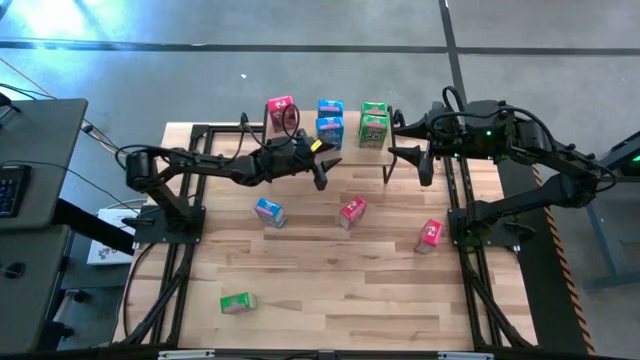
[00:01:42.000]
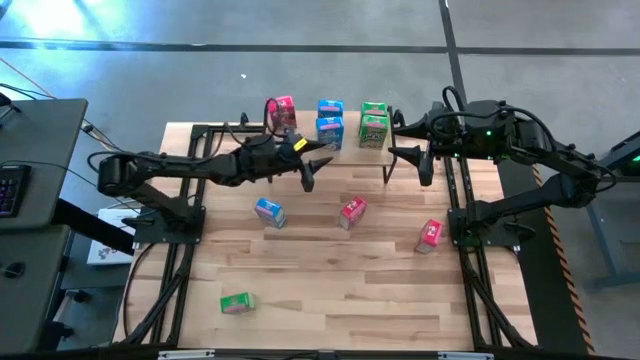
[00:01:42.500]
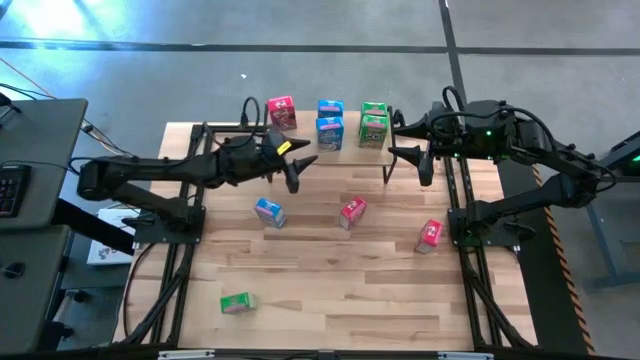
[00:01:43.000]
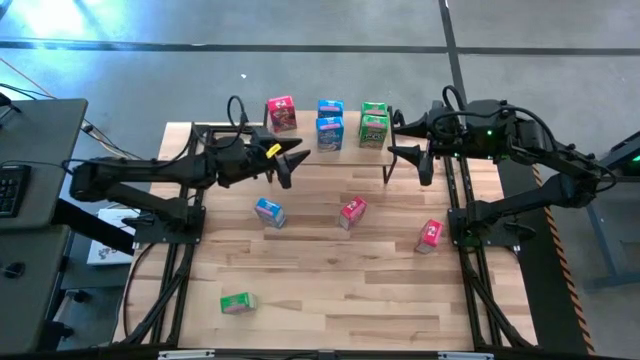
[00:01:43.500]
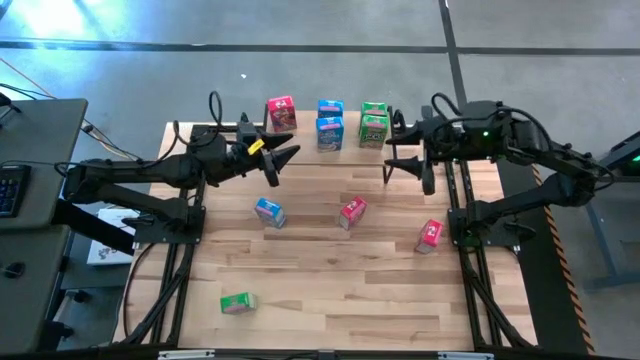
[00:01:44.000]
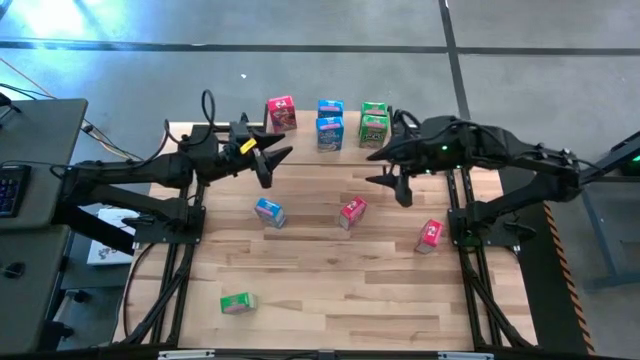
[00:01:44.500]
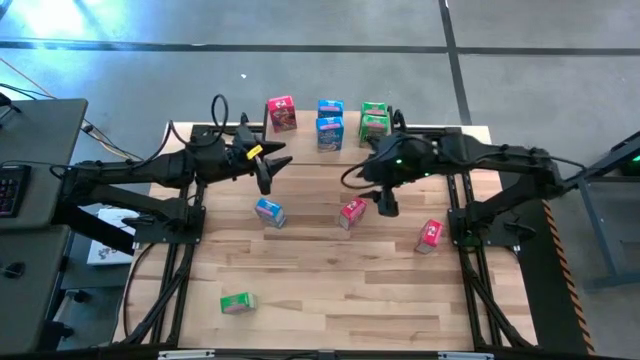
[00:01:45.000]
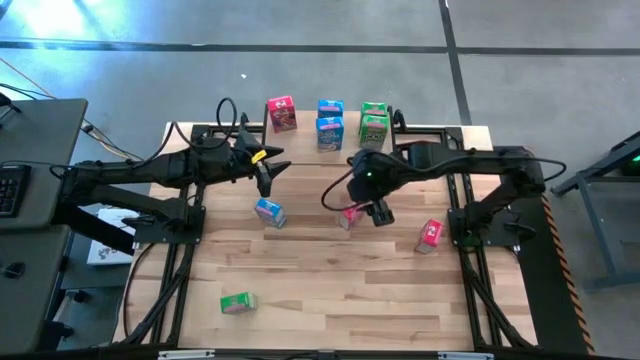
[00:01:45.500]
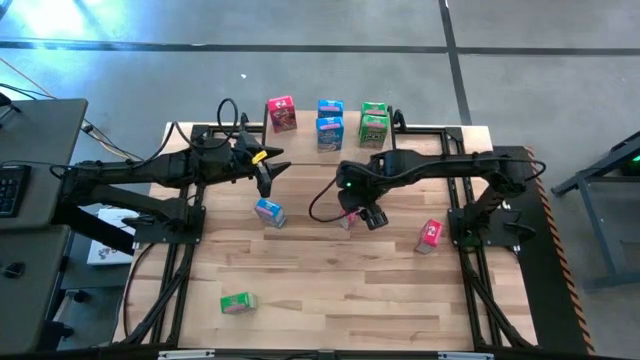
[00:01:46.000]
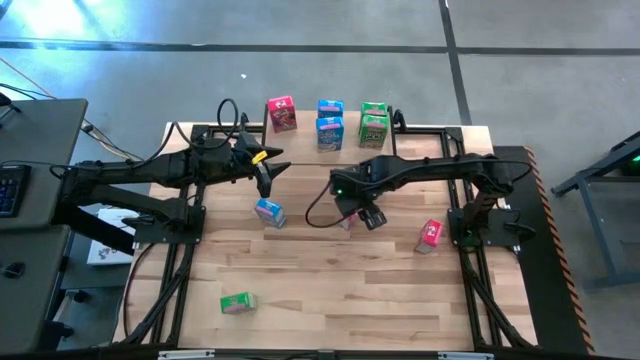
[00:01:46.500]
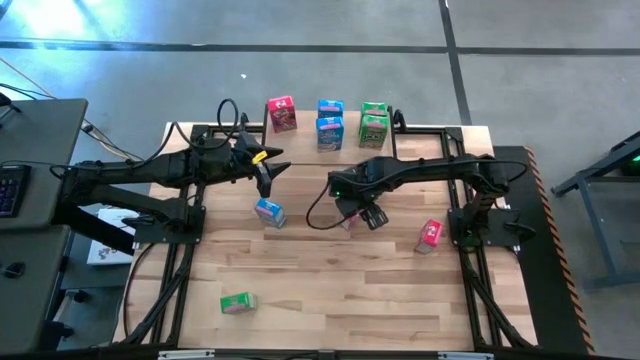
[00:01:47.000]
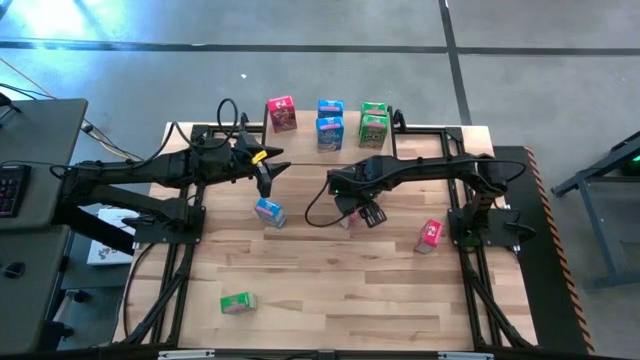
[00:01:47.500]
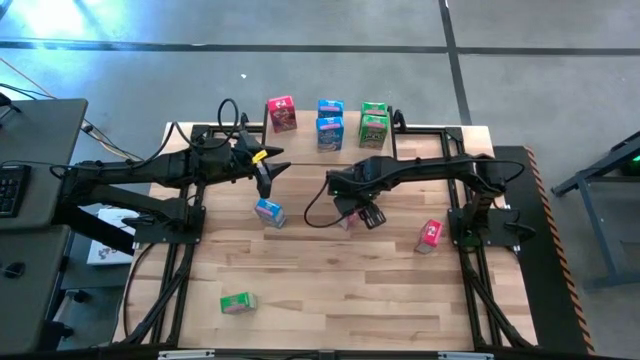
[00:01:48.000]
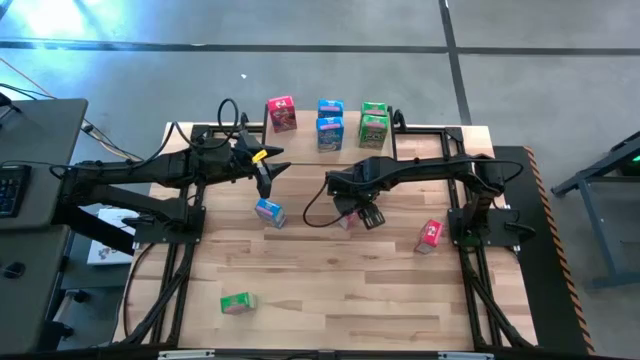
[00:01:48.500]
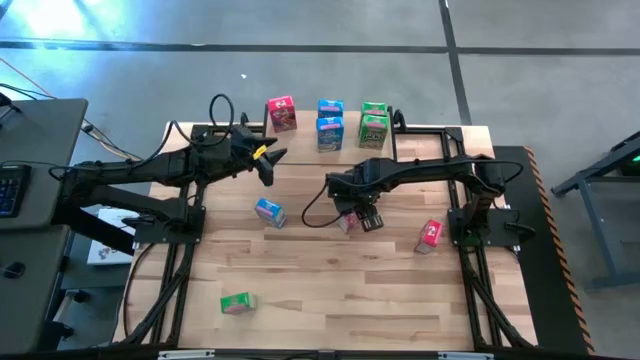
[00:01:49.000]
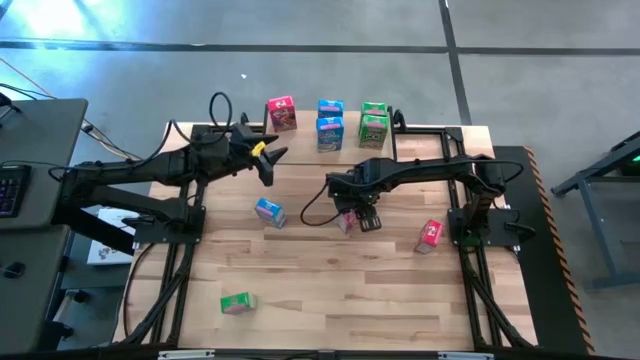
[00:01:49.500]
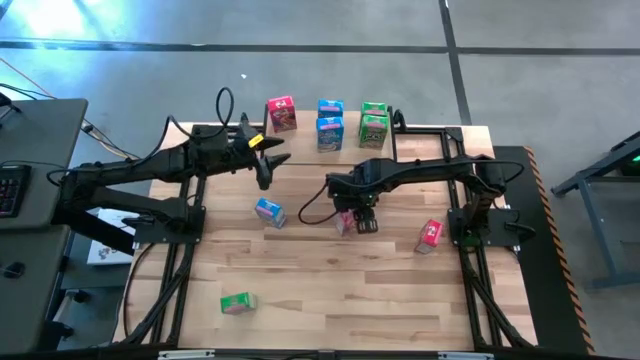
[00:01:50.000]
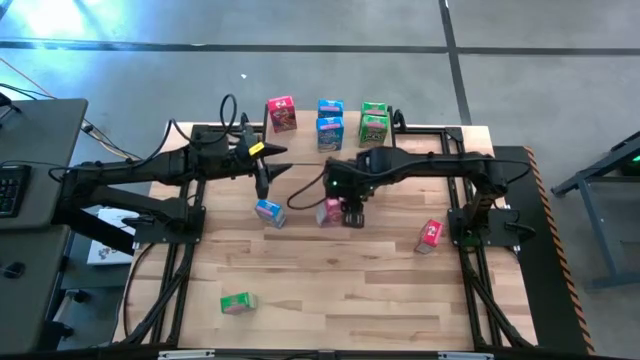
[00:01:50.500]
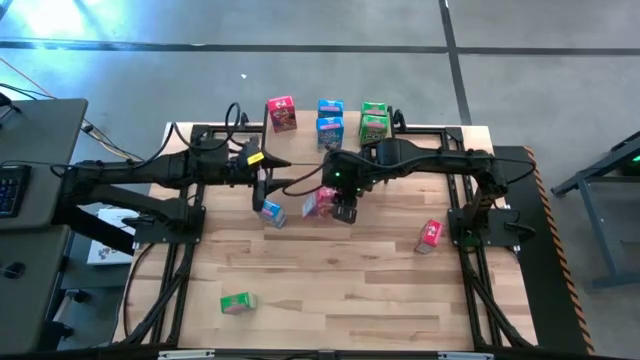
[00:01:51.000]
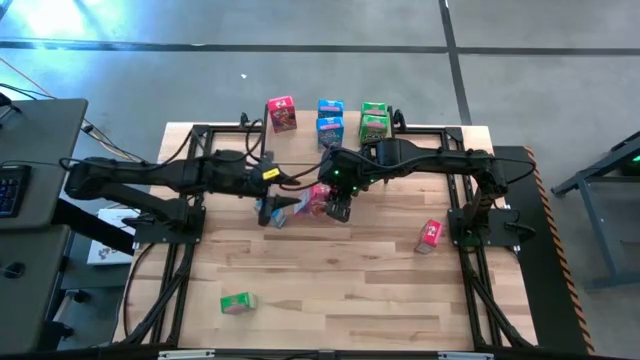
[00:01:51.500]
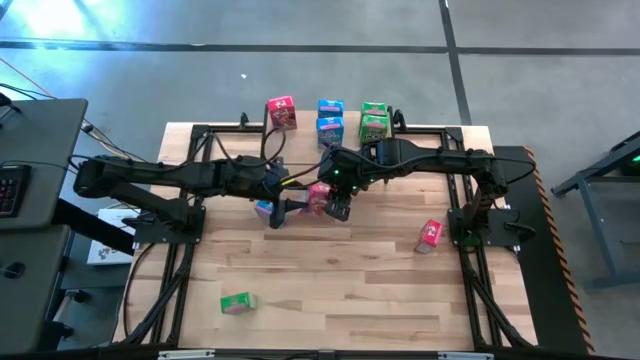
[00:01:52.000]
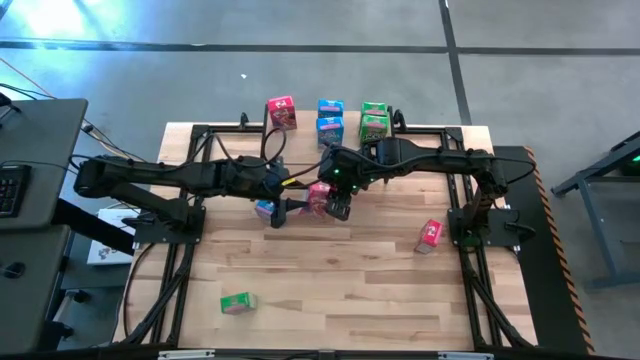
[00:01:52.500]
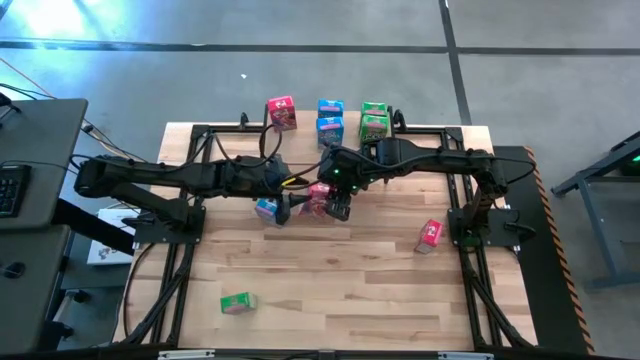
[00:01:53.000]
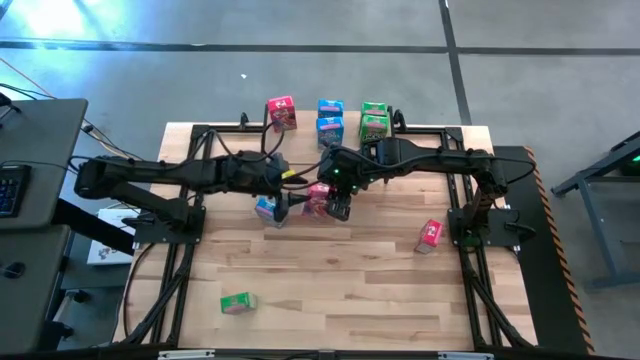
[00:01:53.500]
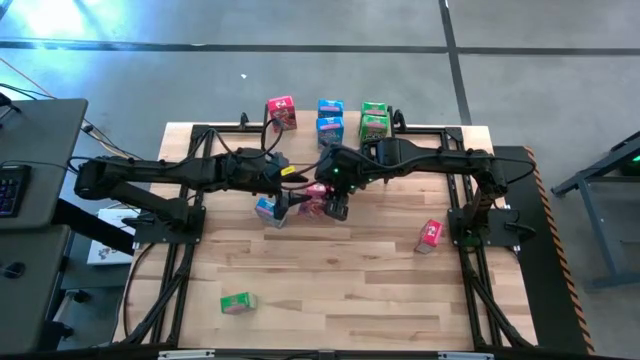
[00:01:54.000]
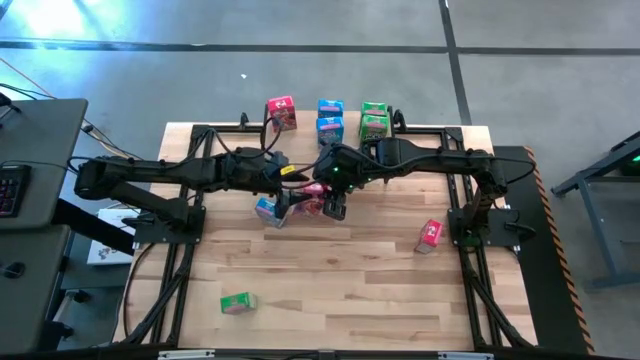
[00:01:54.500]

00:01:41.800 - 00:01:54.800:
Task: Stack cereal on shelf
Put the red cereal box on the shelf aligned with the other red cereal box

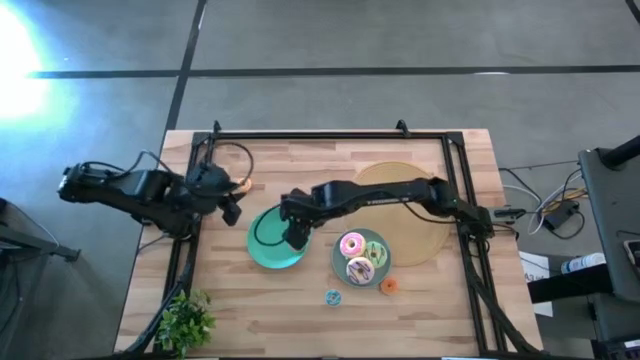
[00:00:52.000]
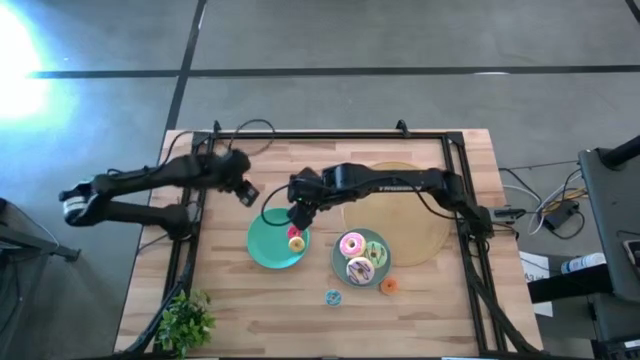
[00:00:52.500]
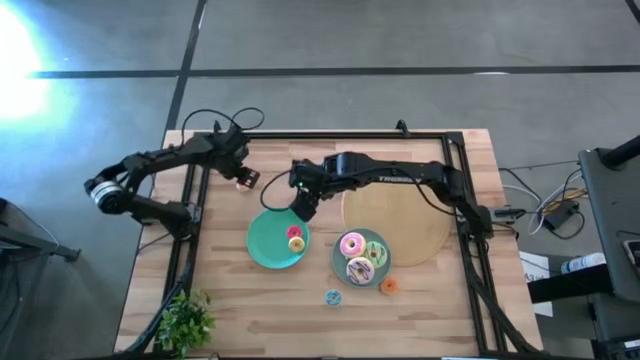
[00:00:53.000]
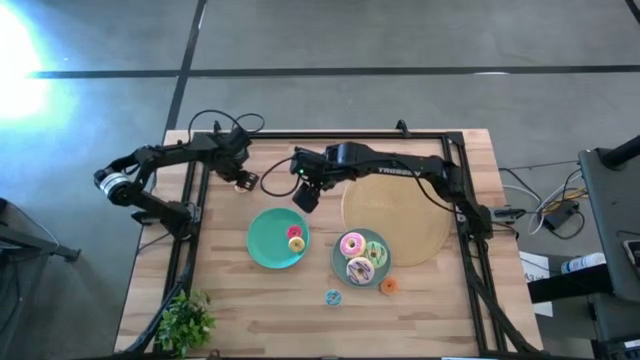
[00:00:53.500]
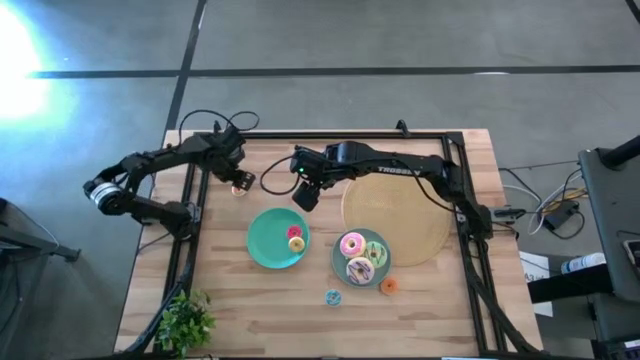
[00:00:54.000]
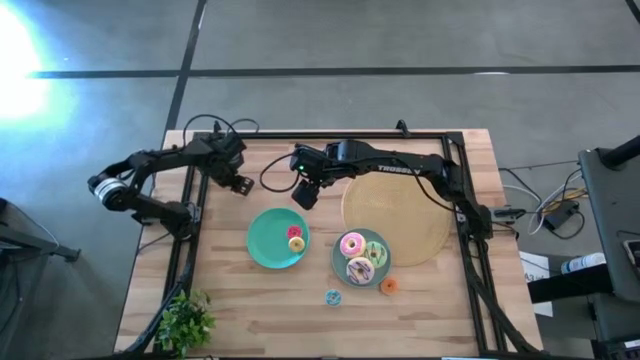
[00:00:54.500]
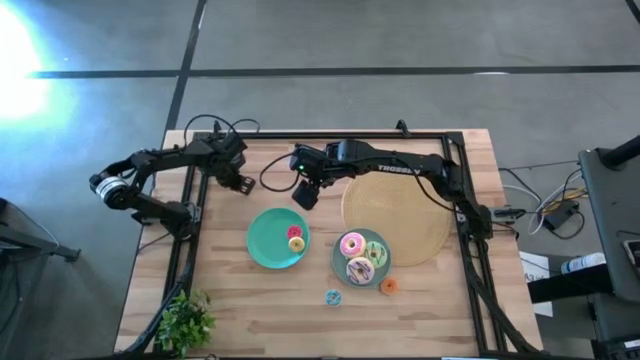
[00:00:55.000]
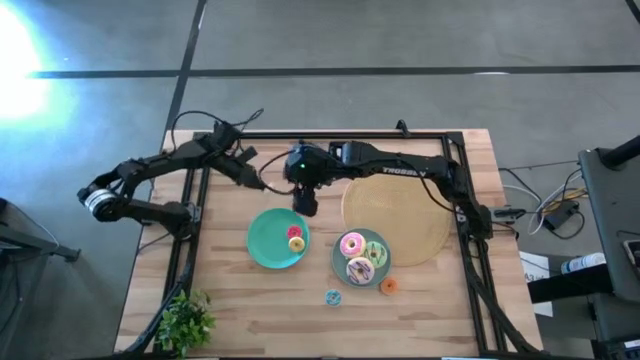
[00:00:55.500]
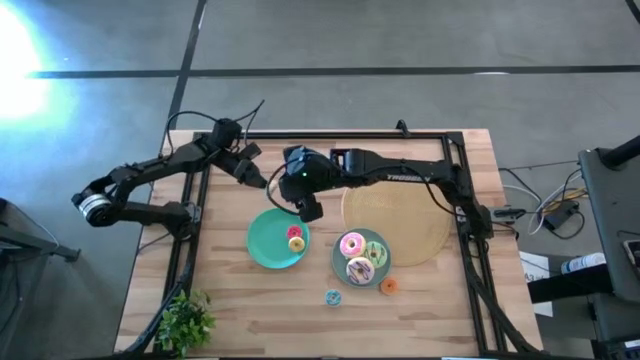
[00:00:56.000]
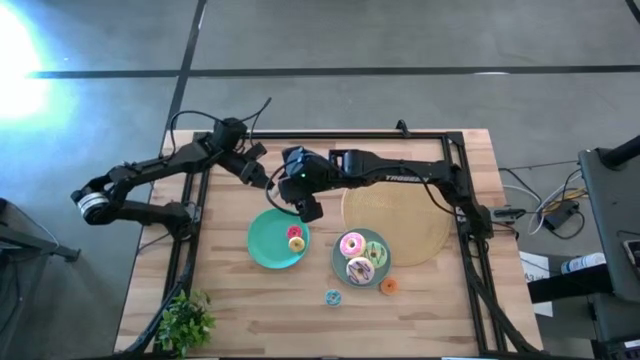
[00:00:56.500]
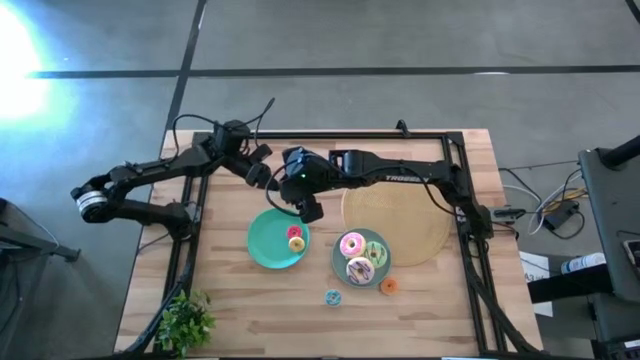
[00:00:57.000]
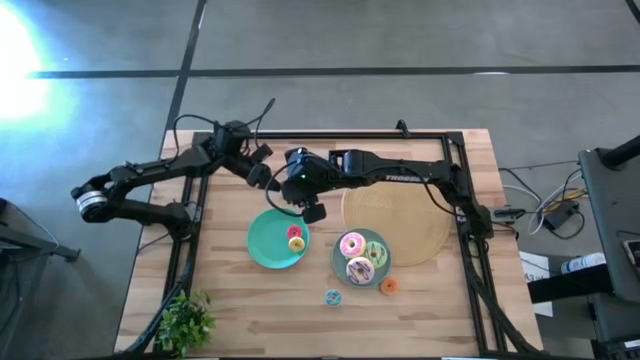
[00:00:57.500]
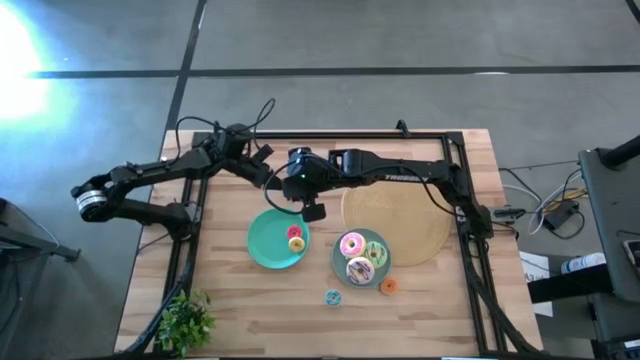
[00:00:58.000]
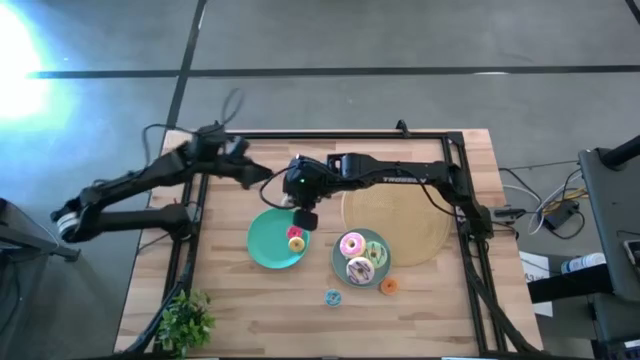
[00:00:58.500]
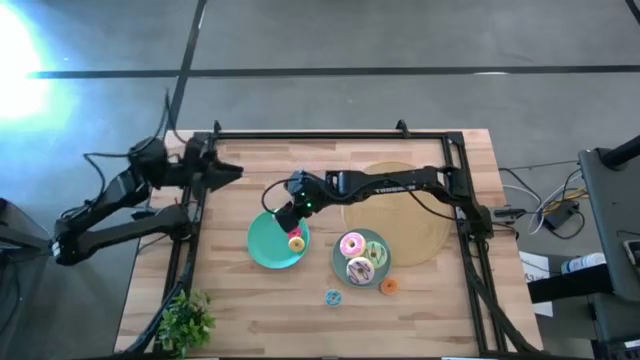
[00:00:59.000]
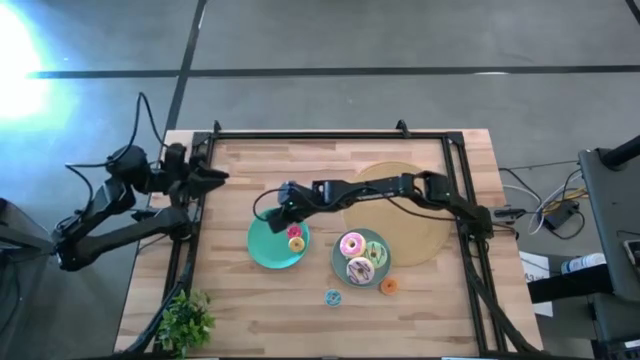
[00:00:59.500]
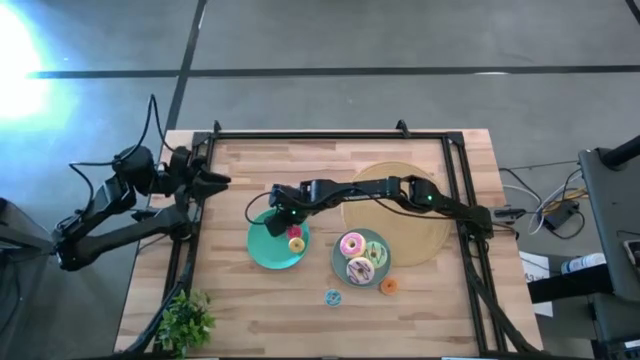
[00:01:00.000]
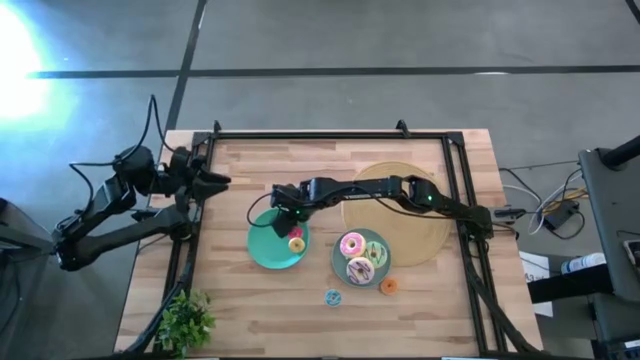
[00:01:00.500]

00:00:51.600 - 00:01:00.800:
Task: Pick & Place donuts
Put the small white donut on the green plate
